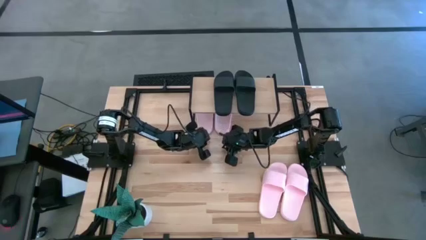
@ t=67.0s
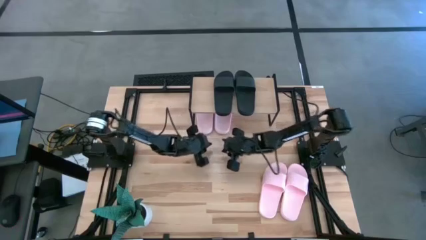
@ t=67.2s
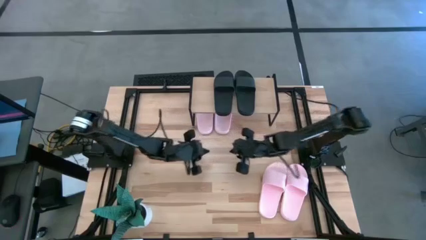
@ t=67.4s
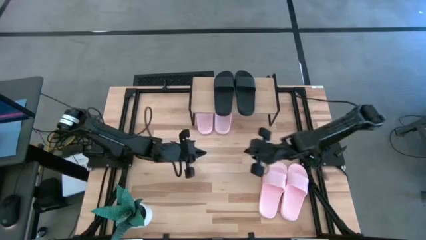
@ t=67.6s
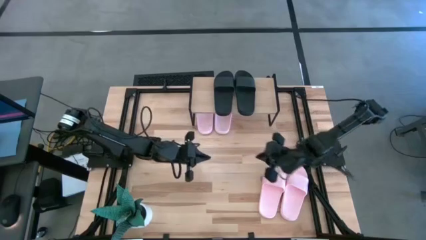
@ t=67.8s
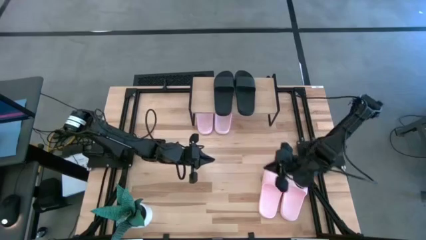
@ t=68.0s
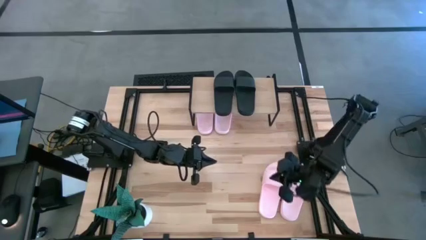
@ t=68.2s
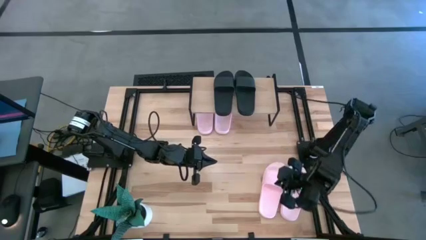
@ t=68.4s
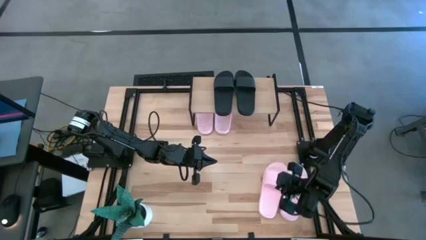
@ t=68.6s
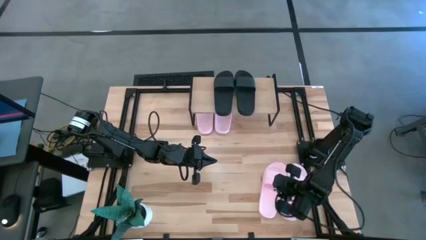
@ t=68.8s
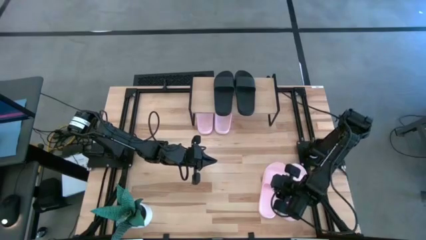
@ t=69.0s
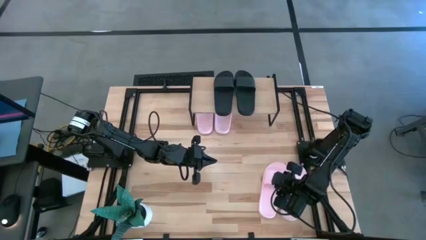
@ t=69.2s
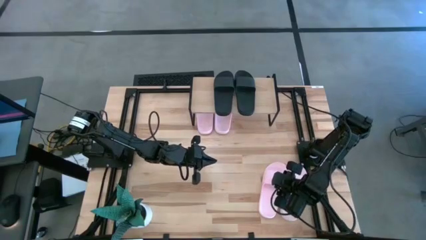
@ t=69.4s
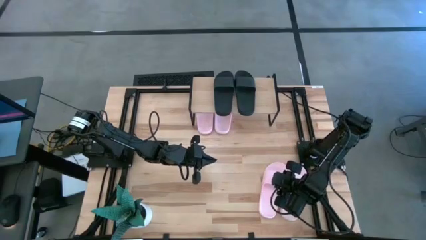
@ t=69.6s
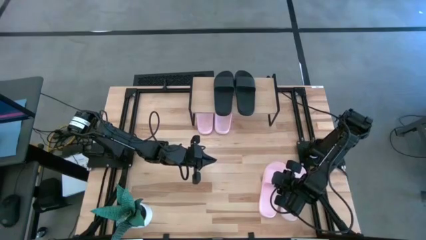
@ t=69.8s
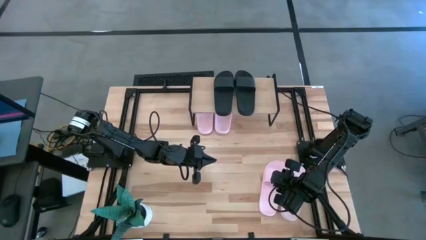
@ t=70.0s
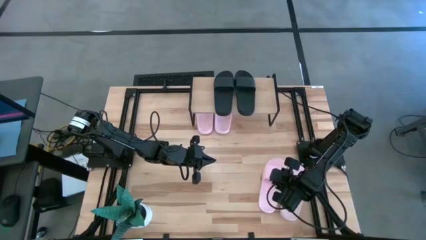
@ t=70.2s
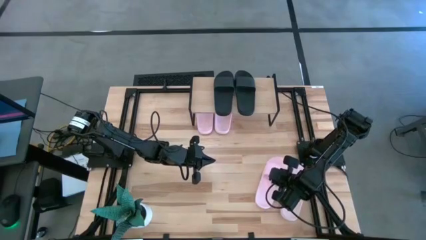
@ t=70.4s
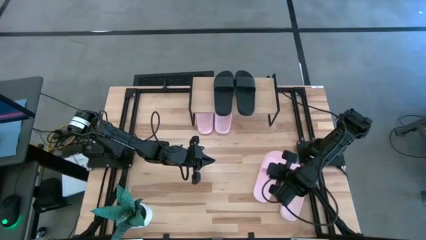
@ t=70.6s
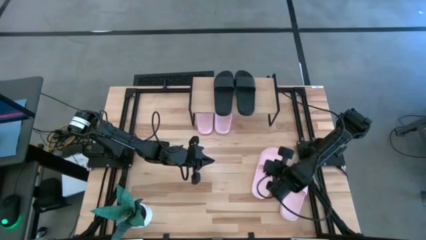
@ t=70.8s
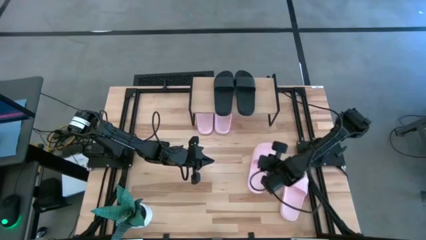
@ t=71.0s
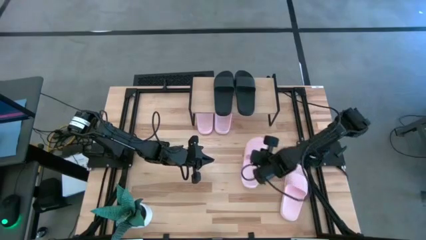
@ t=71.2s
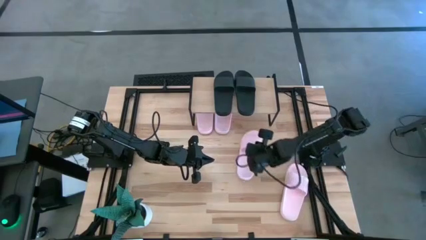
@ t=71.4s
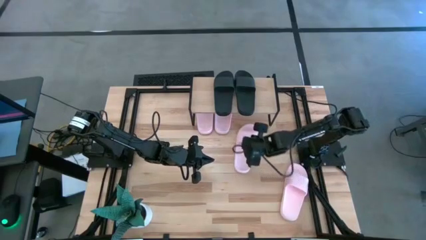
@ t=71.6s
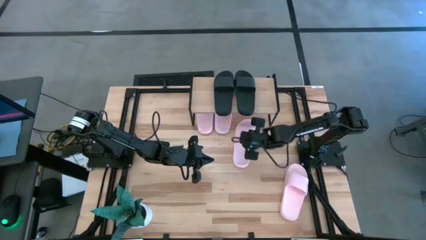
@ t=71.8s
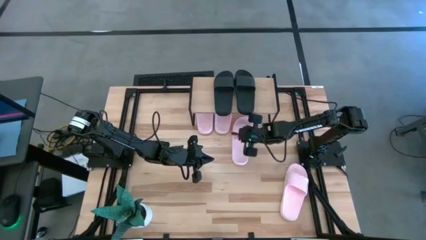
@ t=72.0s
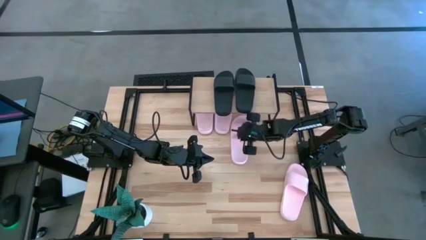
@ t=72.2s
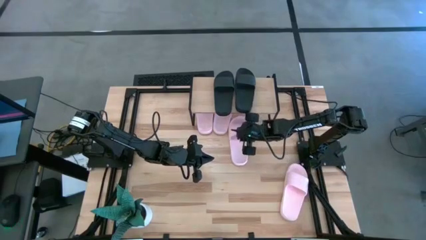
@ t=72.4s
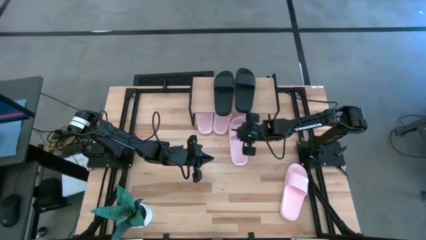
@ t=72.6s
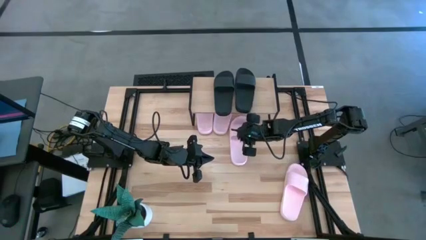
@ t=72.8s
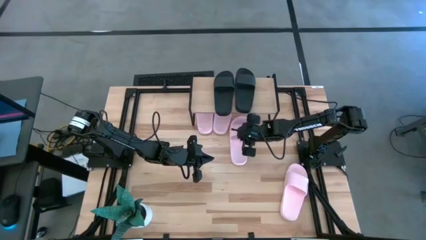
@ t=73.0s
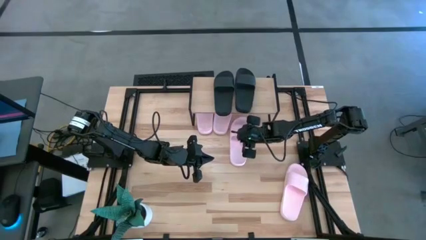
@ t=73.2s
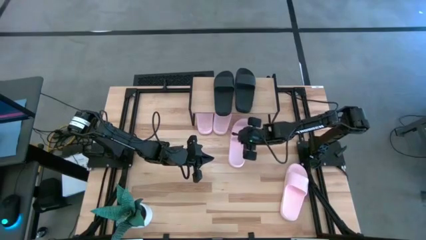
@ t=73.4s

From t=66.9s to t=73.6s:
Task: Pick and place slides into the shelf
Put the pink slipper under the shelf

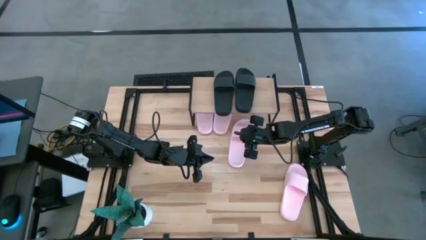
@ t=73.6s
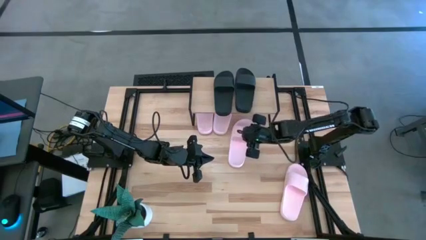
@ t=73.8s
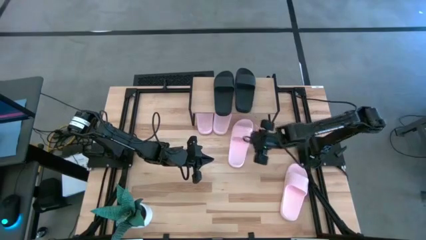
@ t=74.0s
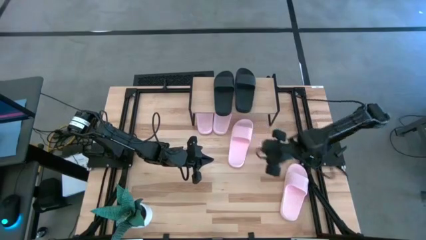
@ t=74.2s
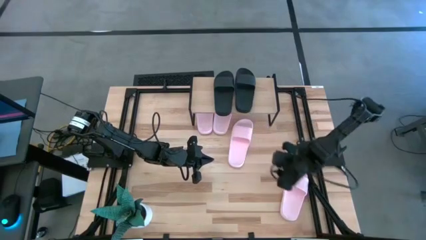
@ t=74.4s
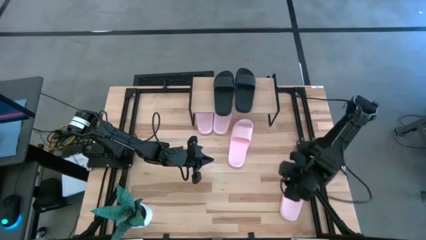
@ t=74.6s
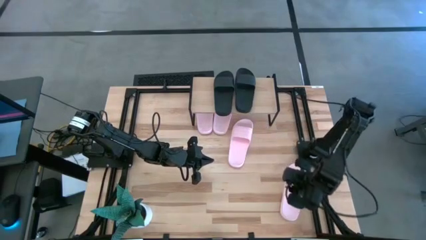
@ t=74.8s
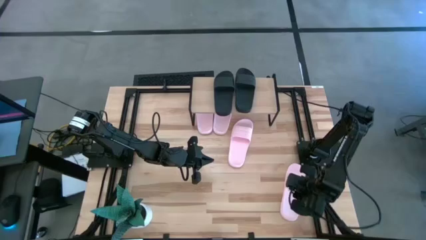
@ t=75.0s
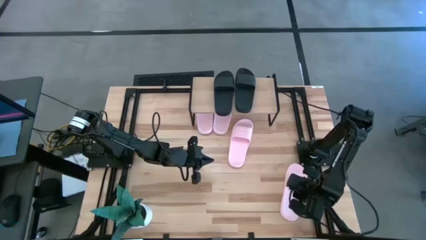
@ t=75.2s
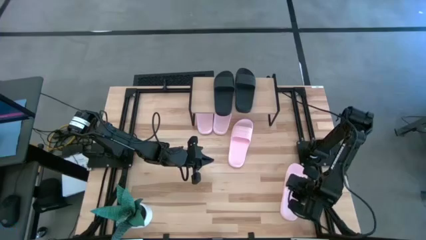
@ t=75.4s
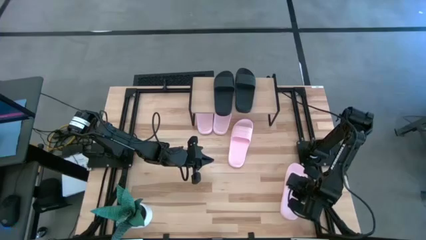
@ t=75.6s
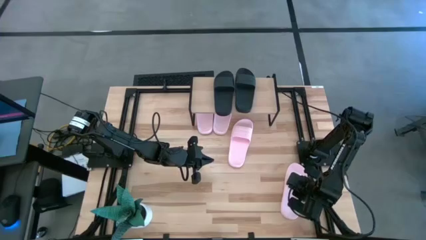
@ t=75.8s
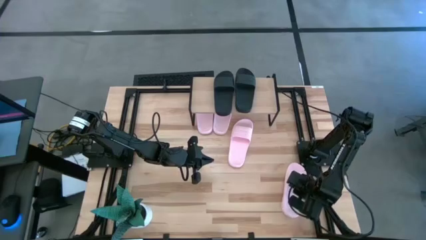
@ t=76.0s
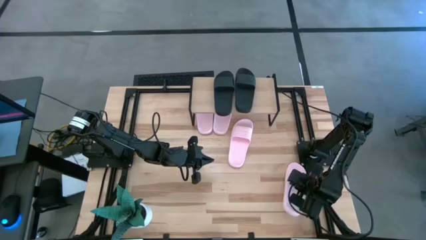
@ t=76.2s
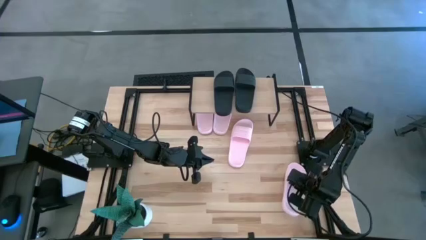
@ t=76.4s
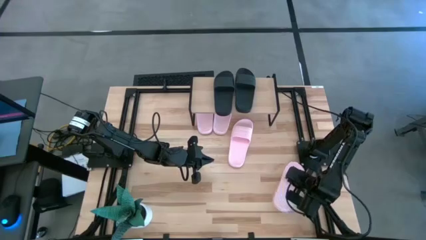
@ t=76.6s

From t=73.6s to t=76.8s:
Put the pink slipper under the shelf

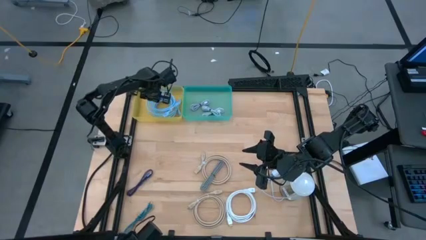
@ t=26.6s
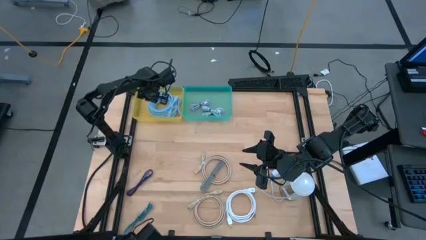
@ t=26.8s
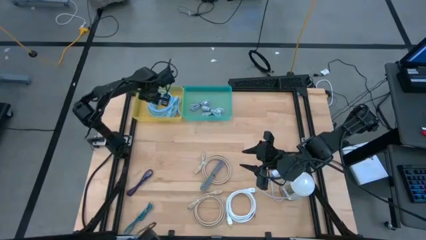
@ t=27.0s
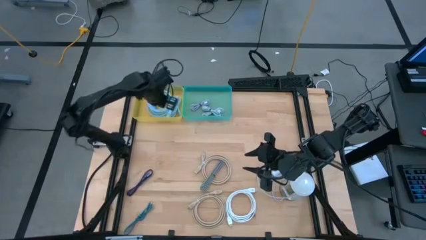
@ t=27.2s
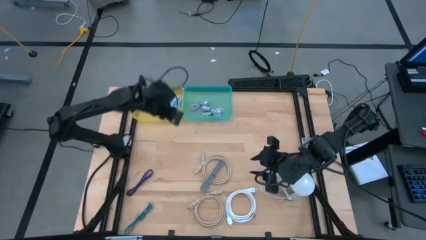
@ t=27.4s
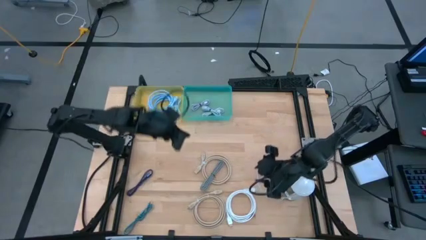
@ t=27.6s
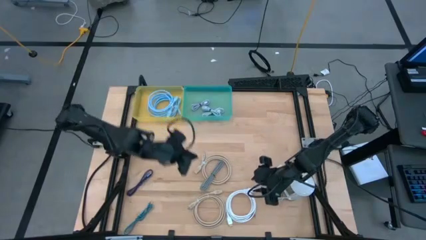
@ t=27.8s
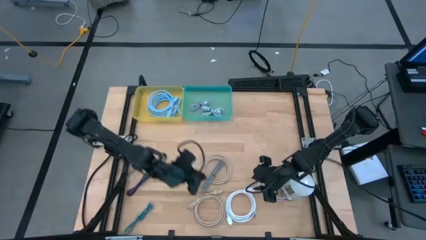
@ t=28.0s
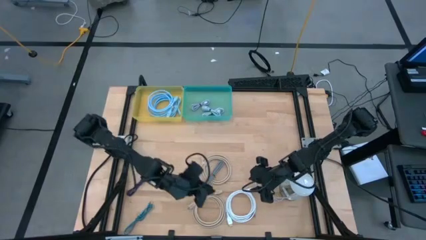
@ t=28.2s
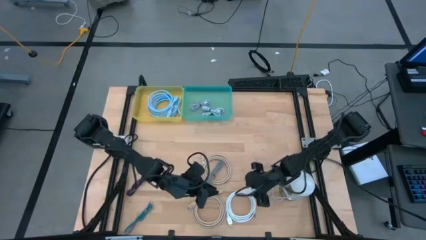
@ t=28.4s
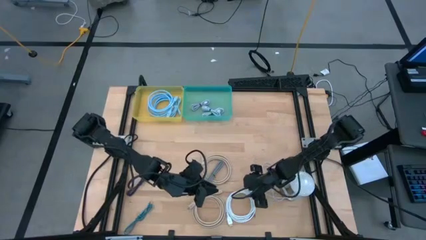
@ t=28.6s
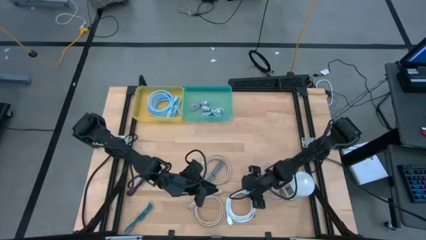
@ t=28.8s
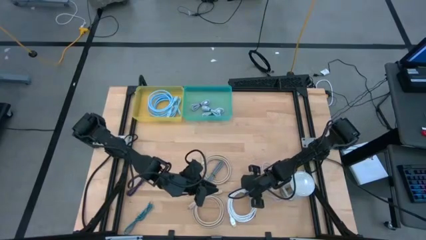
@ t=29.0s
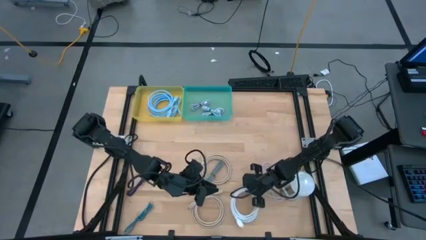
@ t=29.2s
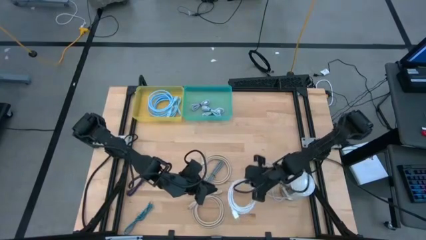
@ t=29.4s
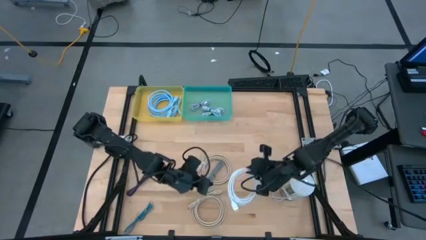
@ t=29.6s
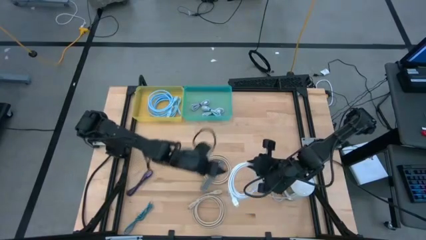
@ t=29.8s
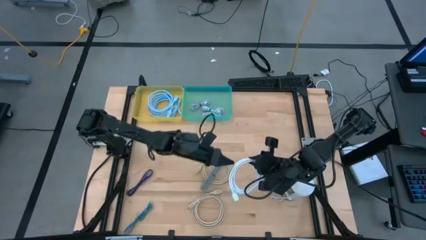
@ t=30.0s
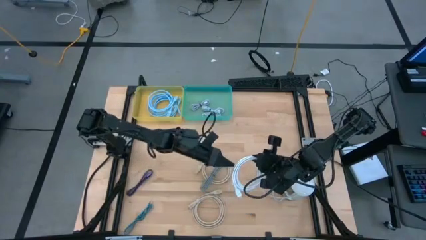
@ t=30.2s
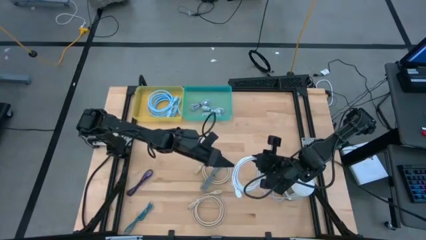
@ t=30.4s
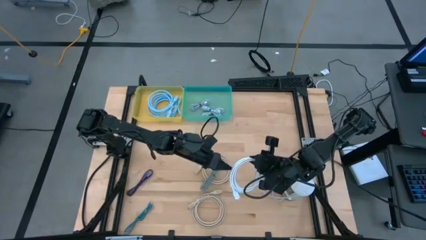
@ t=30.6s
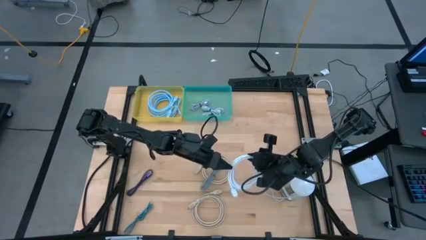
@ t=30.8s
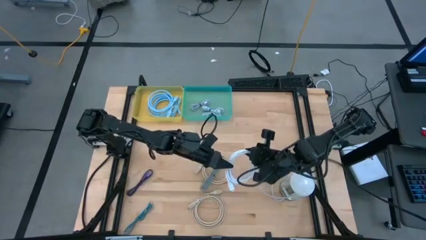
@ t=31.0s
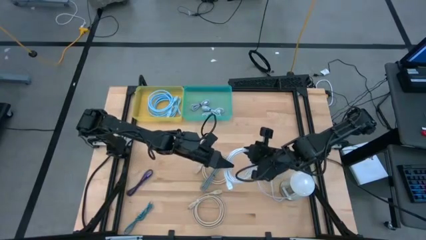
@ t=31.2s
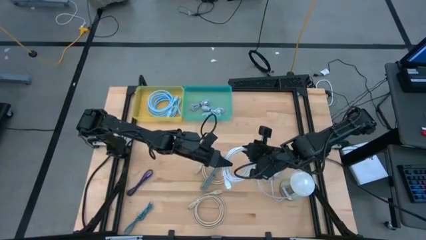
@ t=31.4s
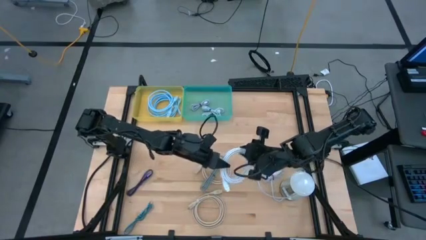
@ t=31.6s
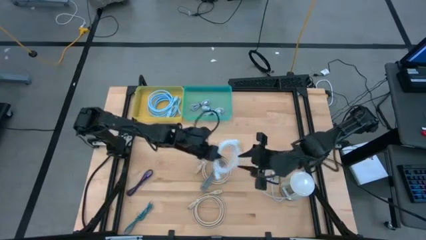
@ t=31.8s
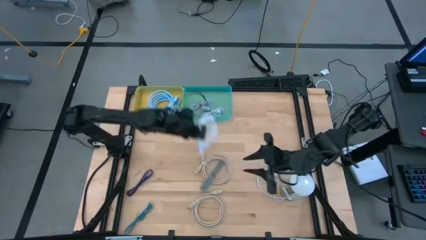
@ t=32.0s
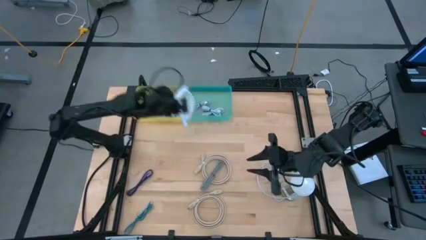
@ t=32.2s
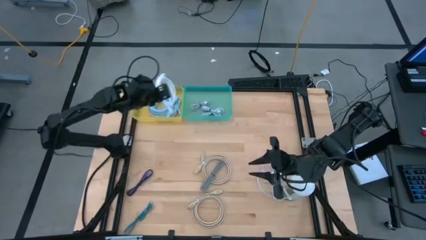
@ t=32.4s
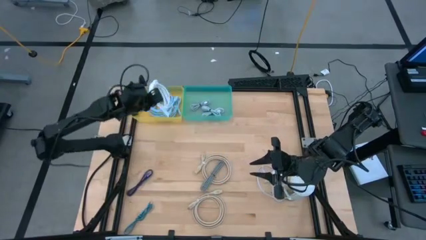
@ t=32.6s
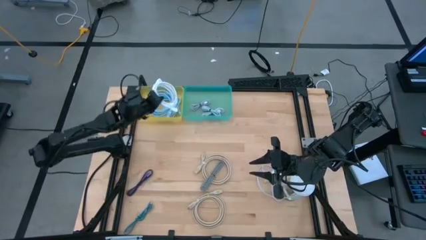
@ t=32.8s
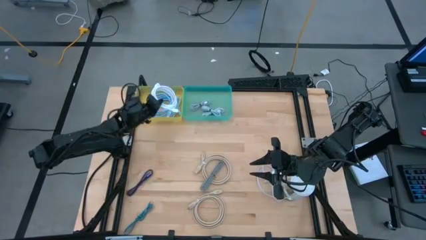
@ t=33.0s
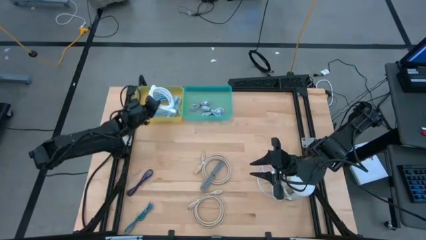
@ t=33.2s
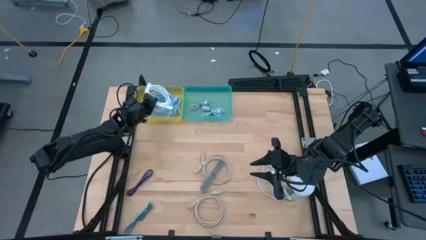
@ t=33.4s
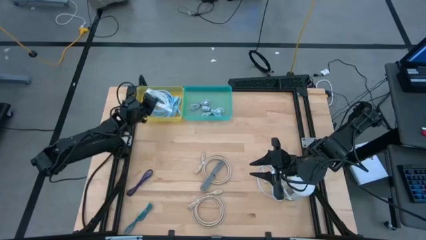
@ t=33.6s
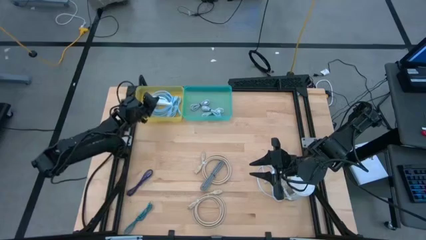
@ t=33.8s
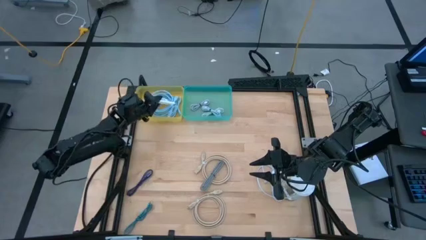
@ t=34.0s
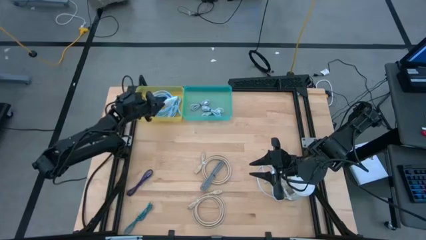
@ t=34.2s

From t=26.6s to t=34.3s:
Task: Pick & Place USB Port
Put the white HDMI cable into the yellow bin
